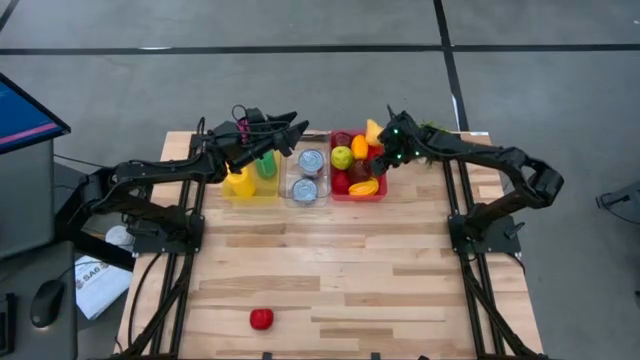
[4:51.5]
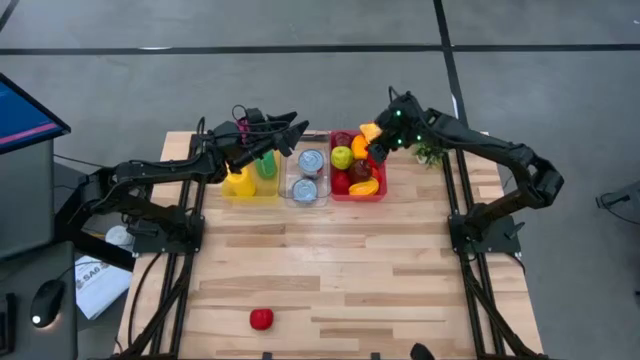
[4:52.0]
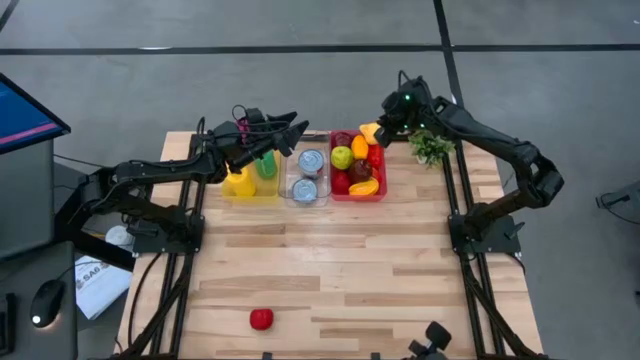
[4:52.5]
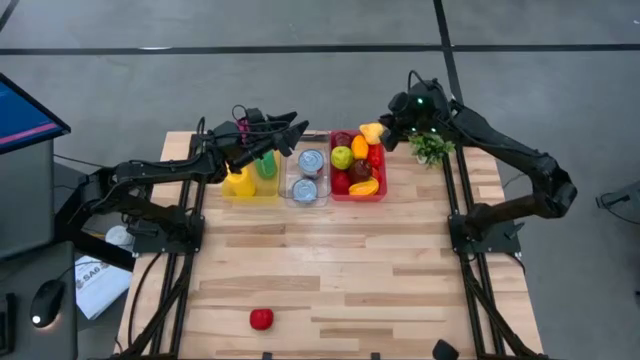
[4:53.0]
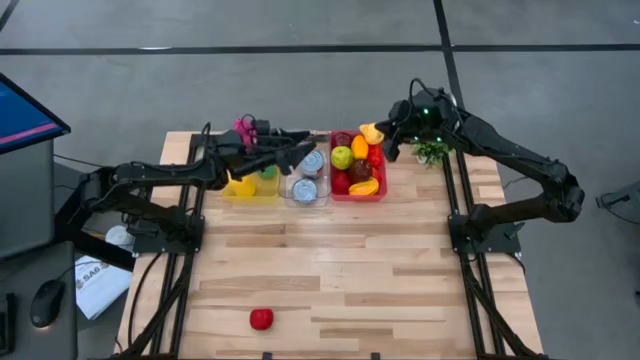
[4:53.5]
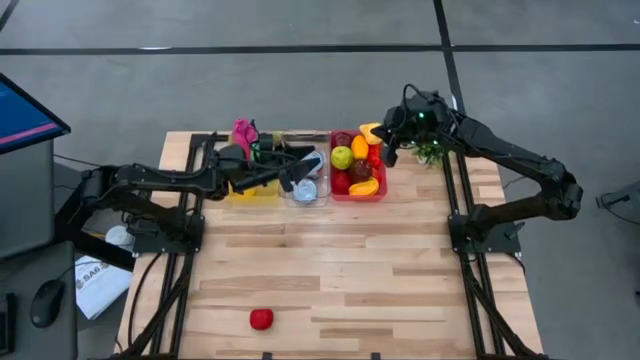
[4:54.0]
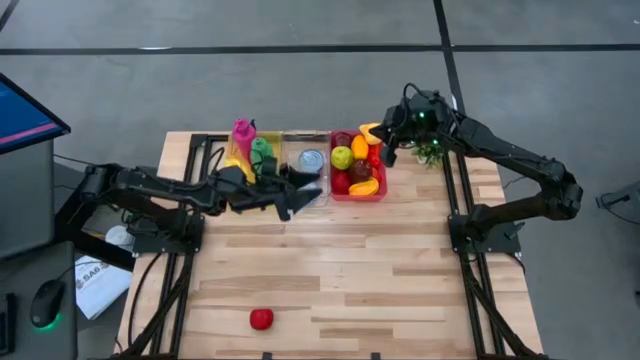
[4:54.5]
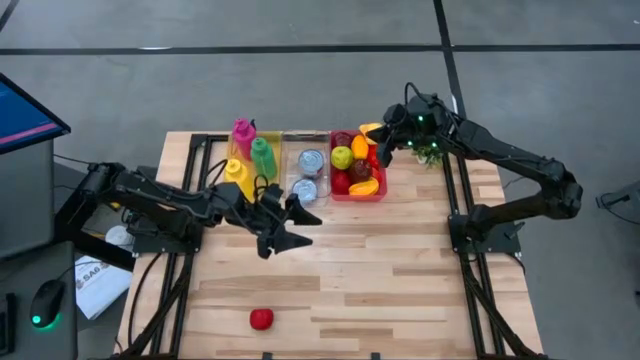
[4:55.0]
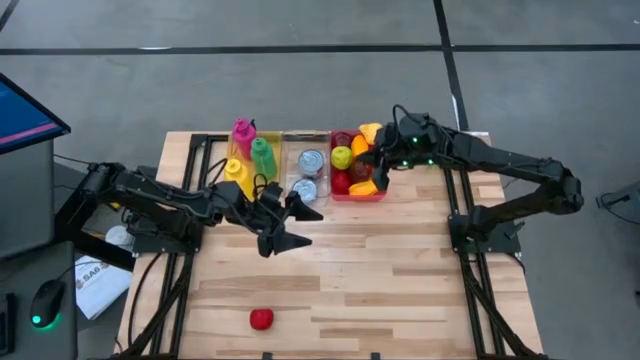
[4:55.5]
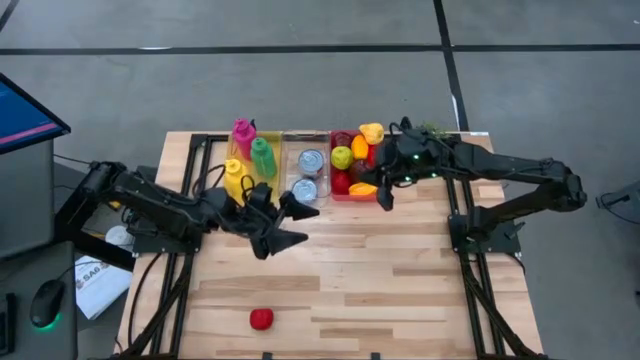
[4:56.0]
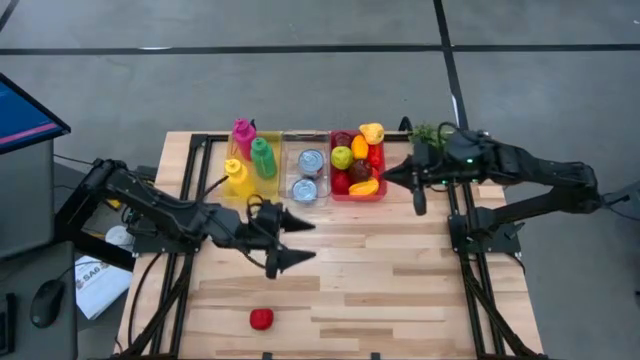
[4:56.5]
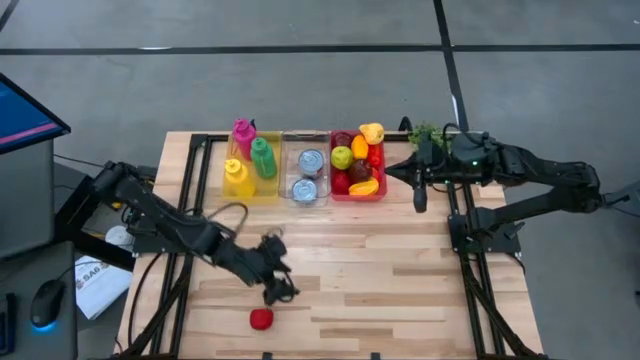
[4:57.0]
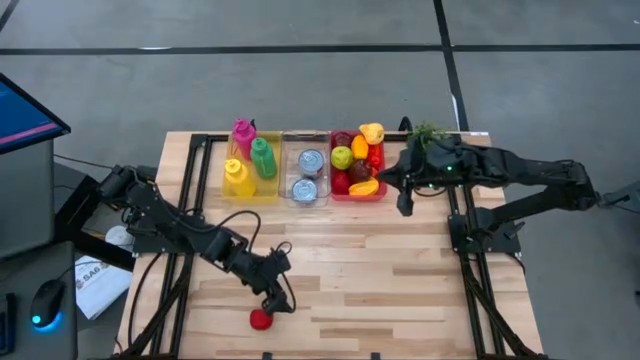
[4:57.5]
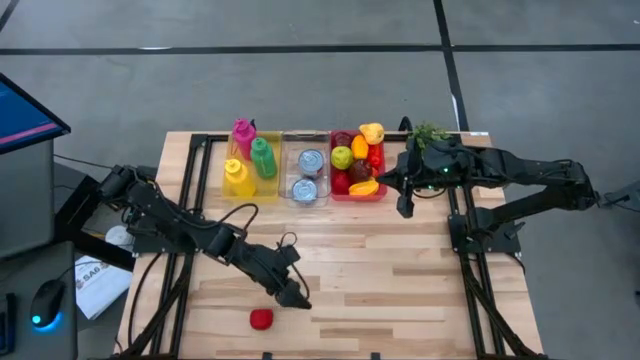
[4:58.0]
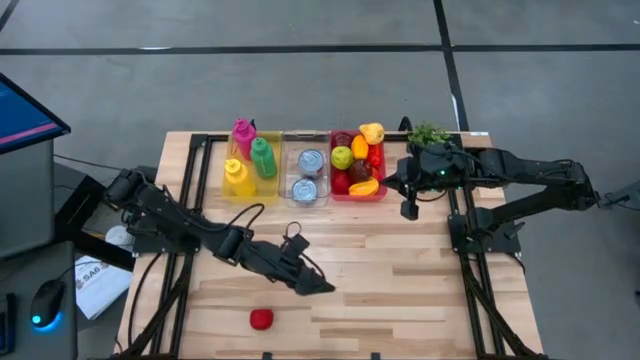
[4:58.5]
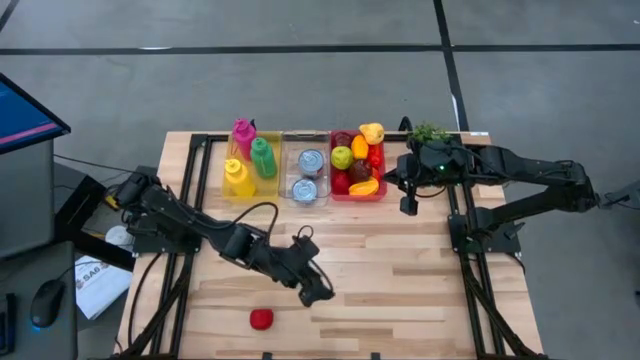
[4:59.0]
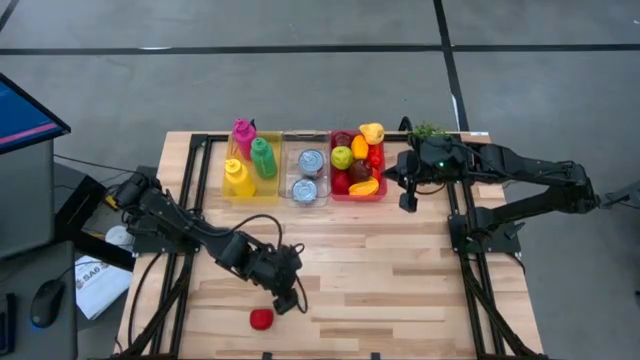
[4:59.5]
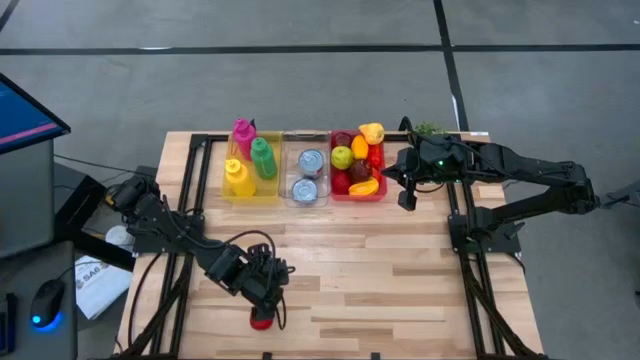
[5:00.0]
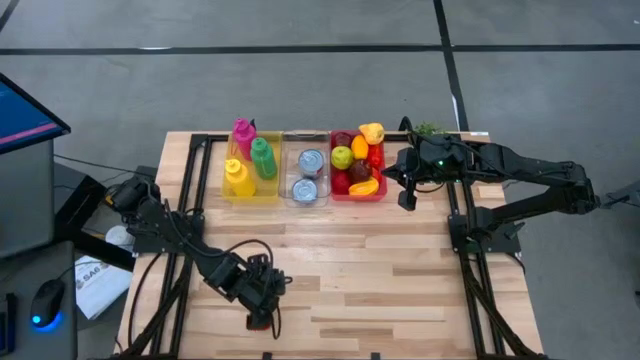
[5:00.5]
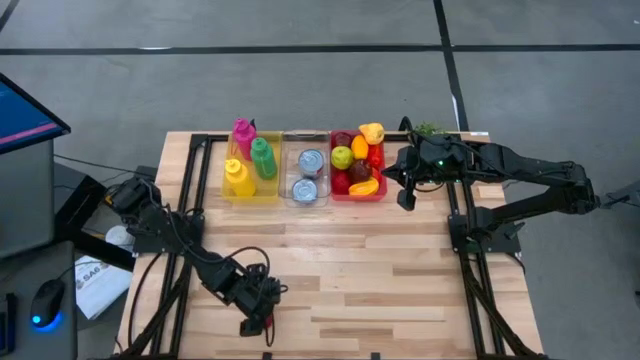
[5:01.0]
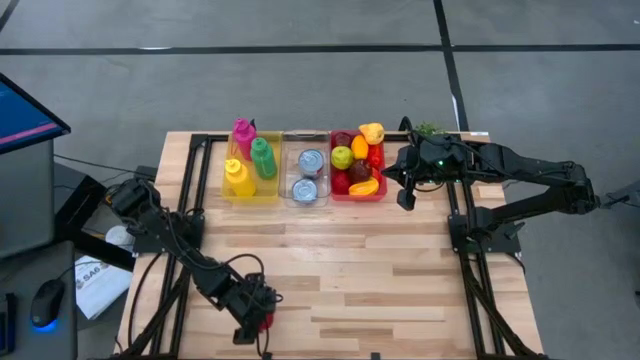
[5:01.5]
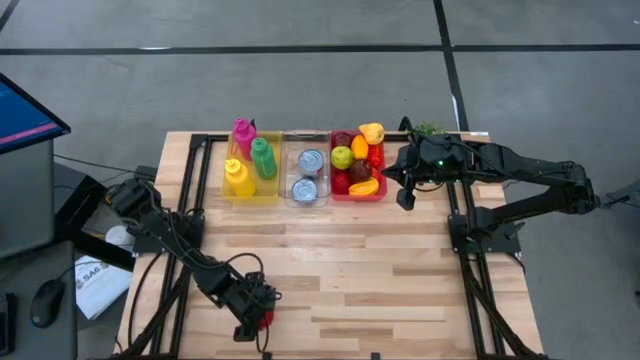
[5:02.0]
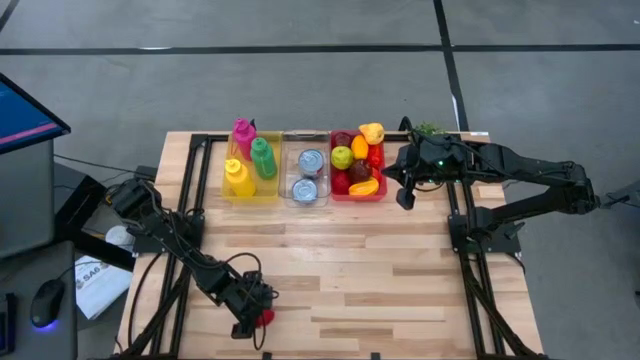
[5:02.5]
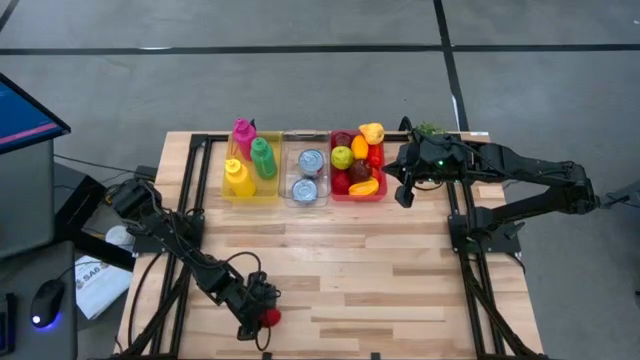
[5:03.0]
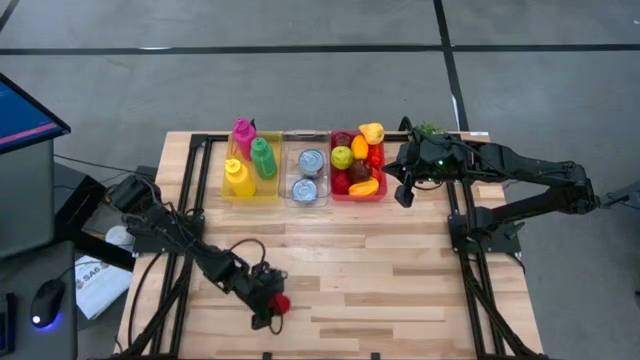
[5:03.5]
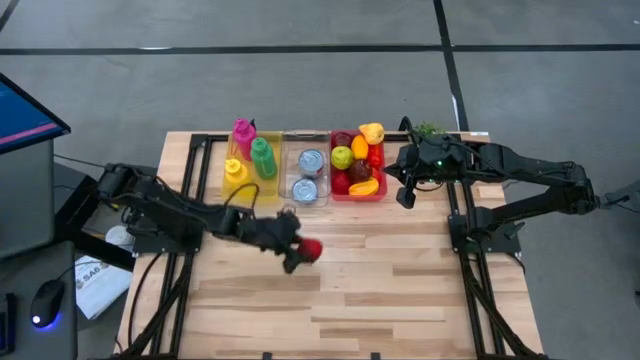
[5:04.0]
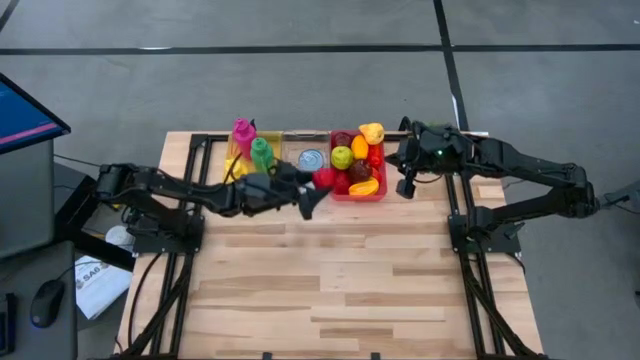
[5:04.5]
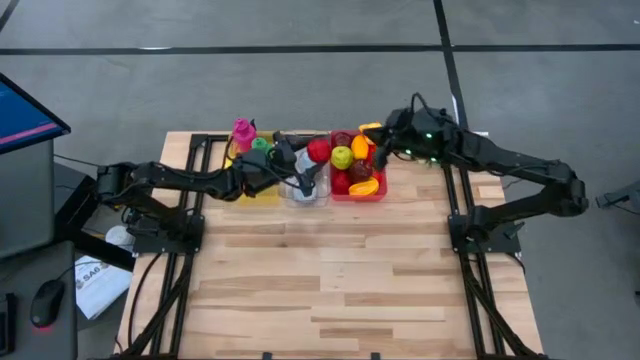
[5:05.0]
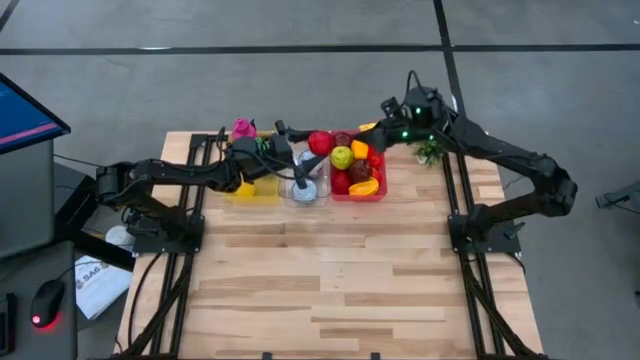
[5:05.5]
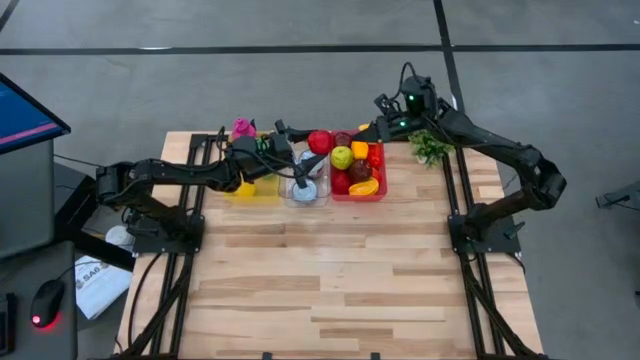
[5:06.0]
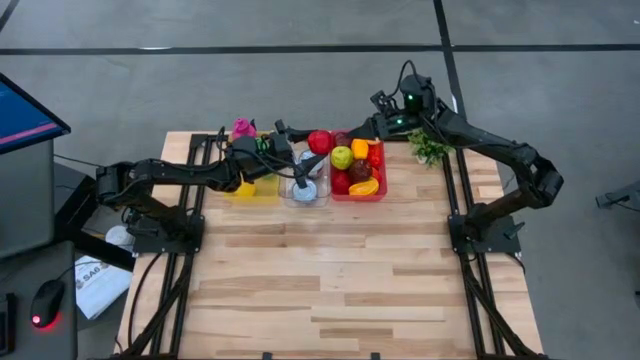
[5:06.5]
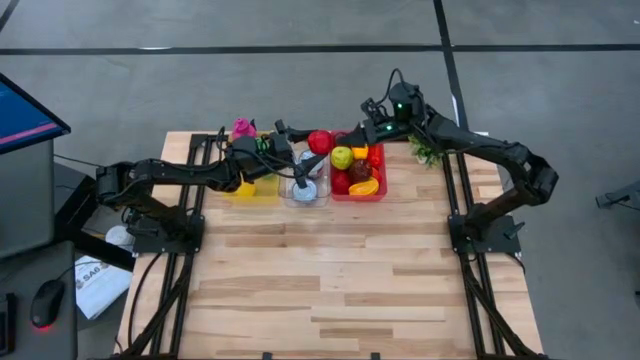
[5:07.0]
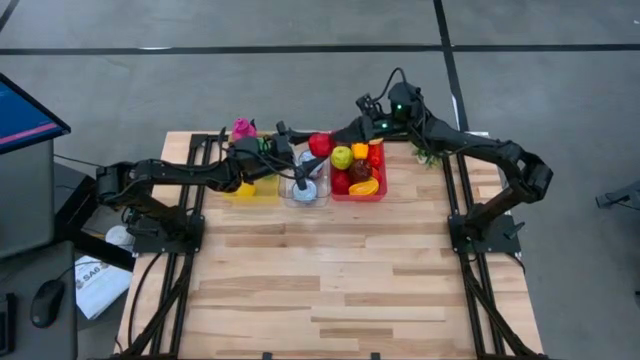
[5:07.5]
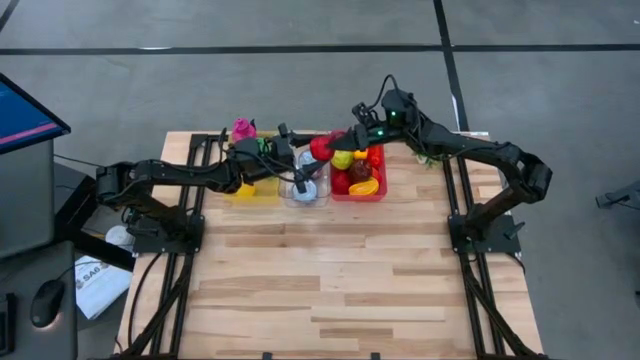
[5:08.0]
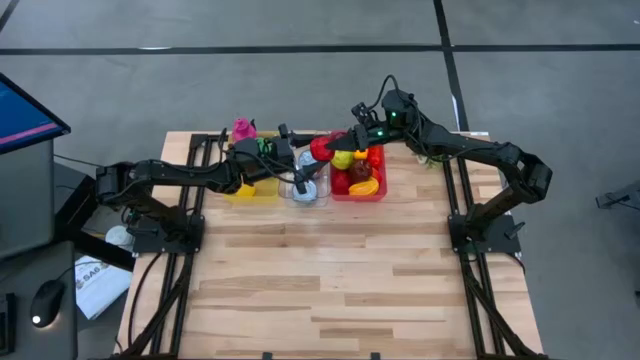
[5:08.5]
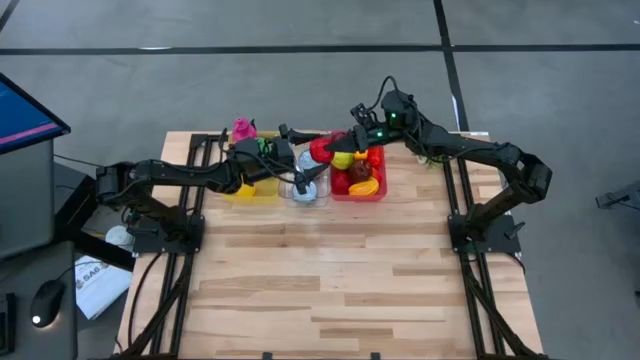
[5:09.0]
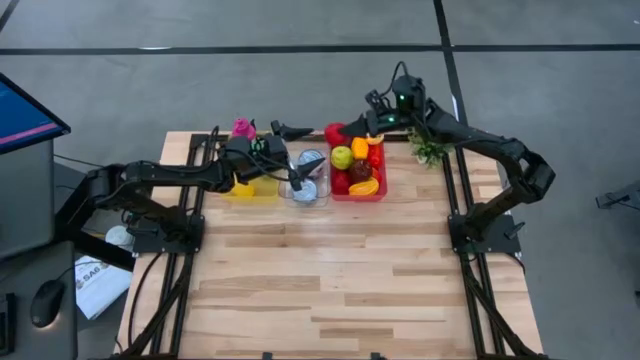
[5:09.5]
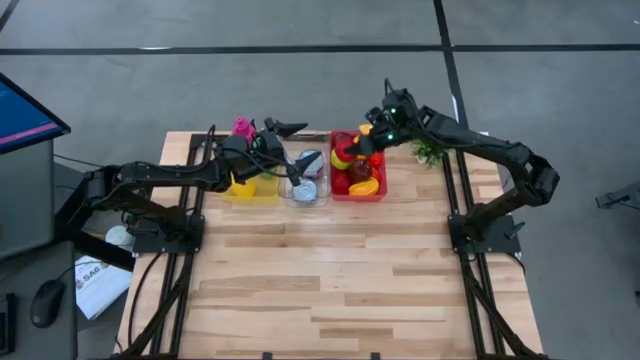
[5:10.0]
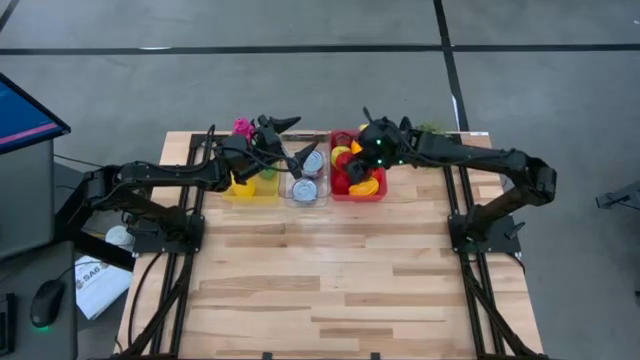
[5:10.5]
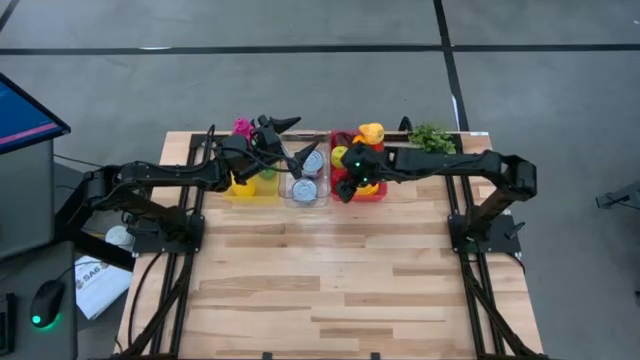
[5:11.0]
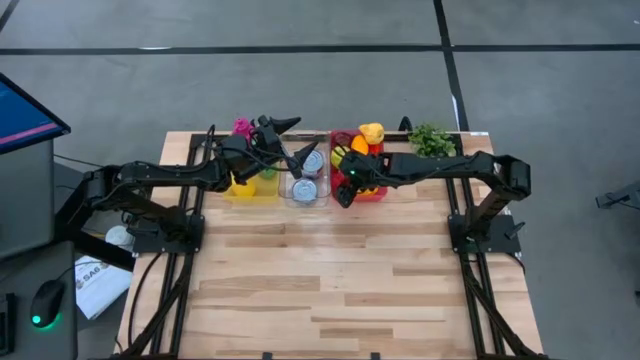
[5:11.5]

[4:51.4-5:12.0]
Task: Pick & Place Food Item
Put the red apple into the pink bin

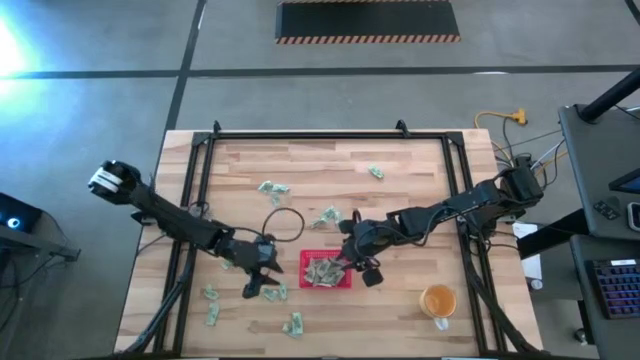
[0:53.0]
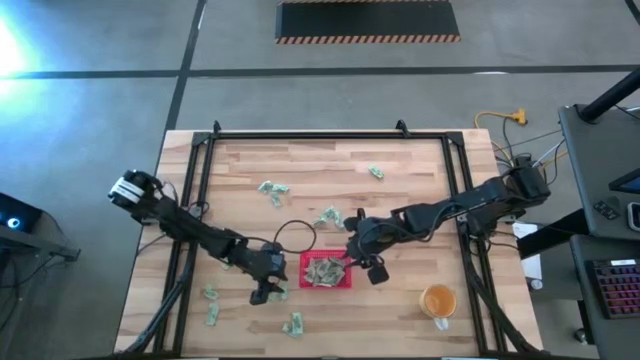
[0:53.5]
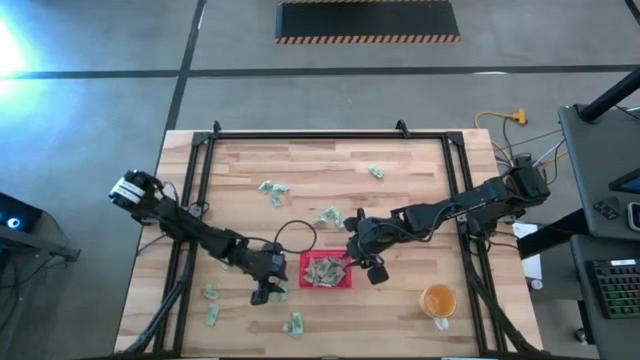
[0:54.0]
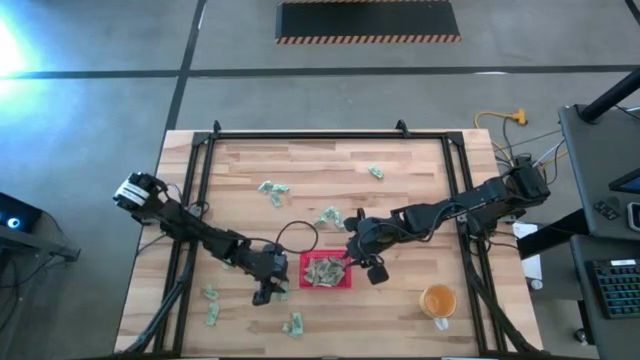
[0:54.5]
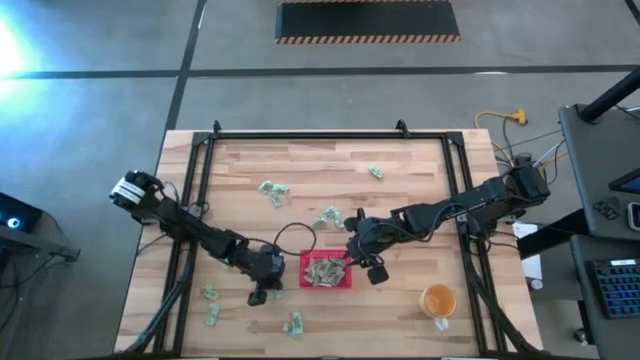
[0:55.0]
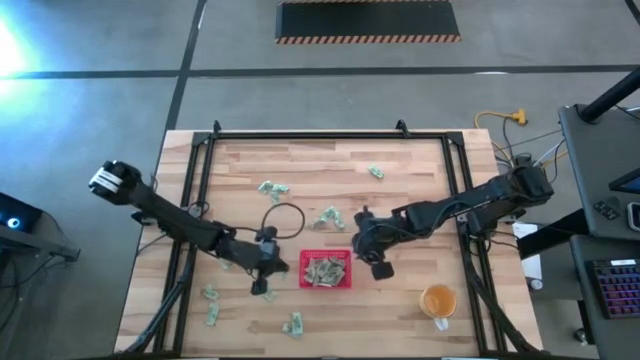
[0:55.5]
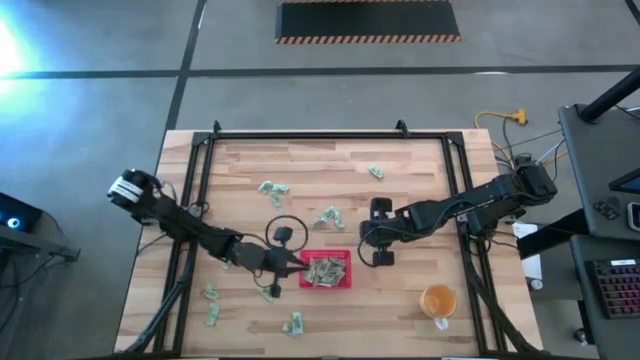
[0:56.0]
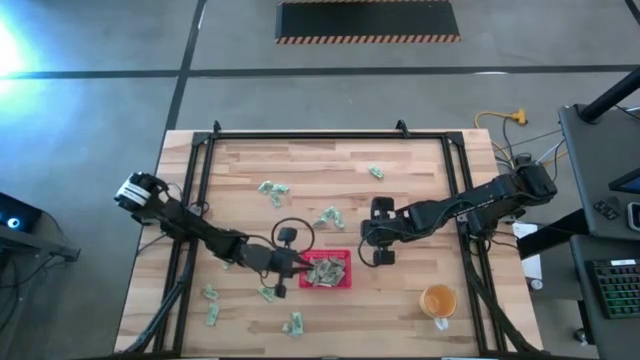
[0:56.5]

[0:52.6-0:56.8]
Task: Pick and place Stevia / Truvia into bins
Put the white stevia packet into the red bin
